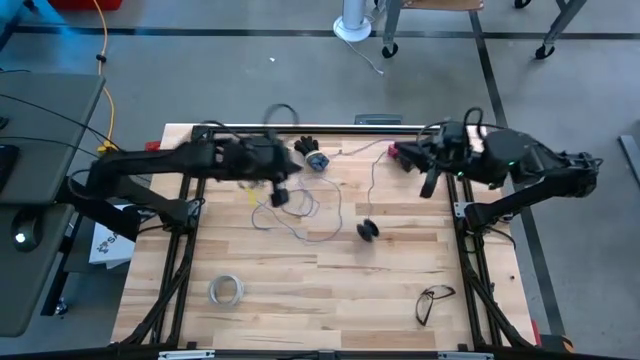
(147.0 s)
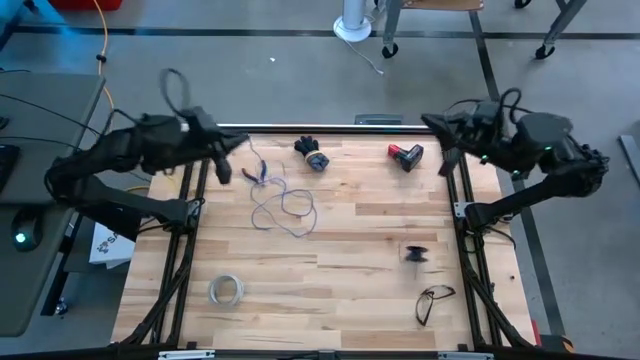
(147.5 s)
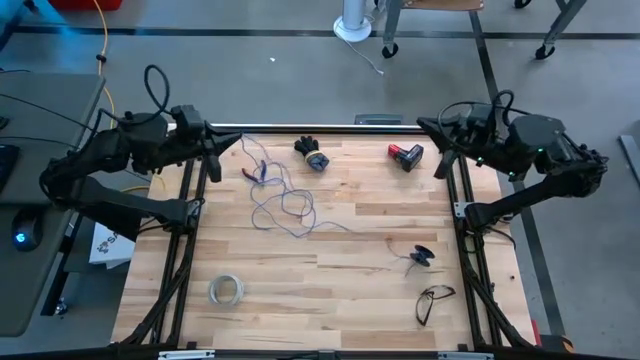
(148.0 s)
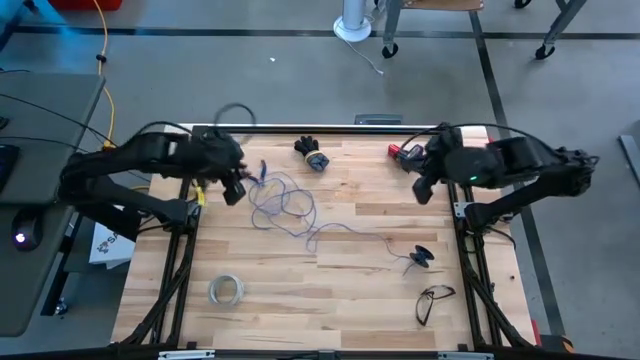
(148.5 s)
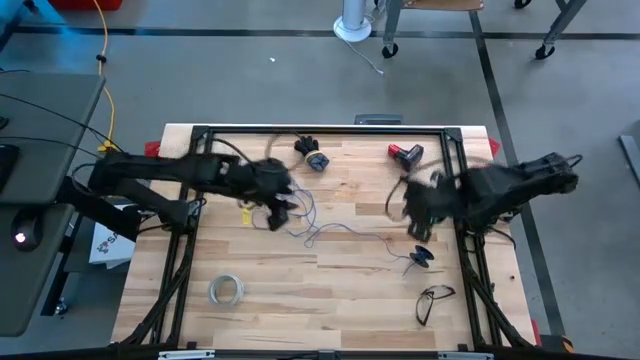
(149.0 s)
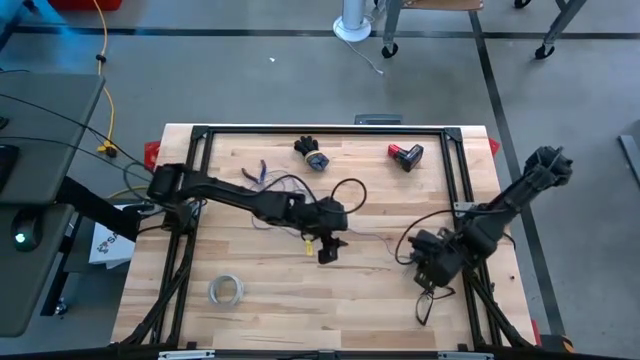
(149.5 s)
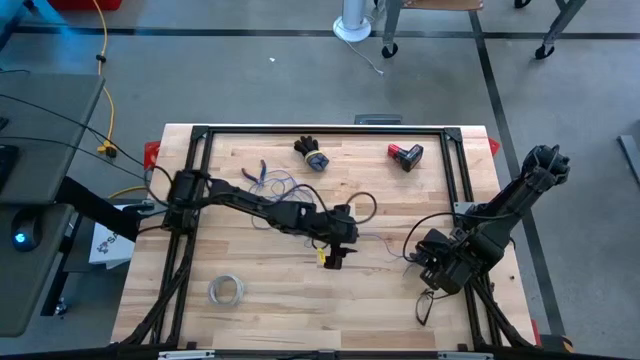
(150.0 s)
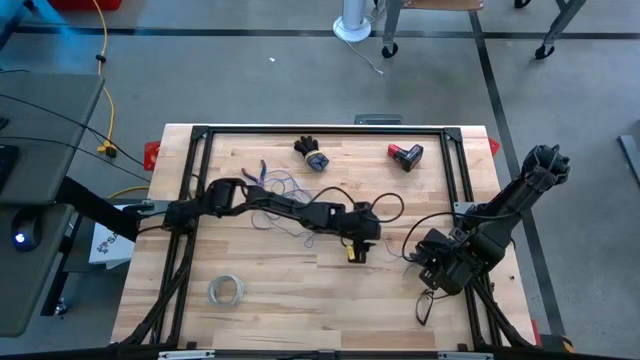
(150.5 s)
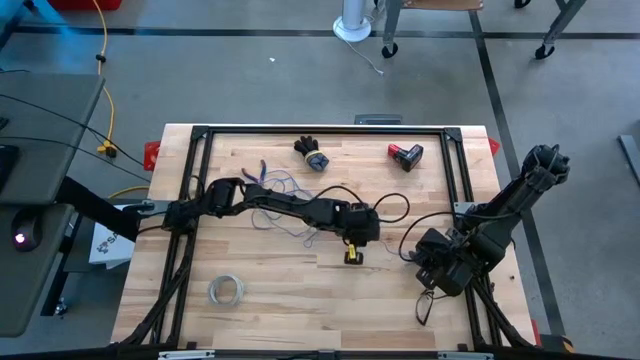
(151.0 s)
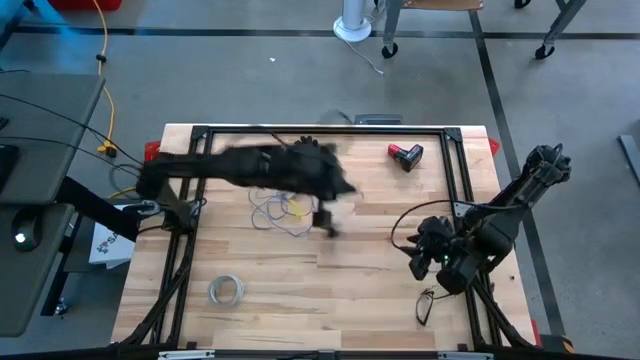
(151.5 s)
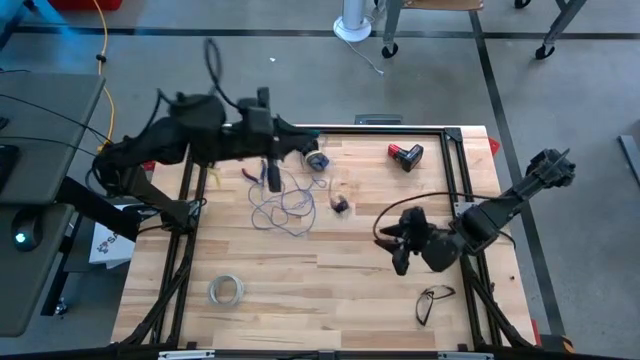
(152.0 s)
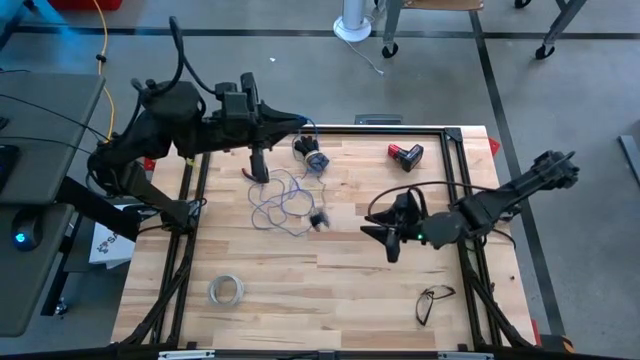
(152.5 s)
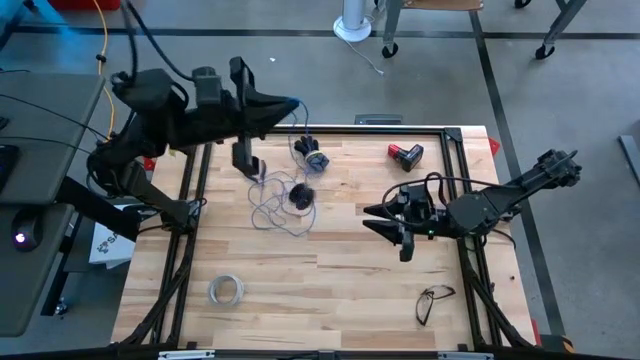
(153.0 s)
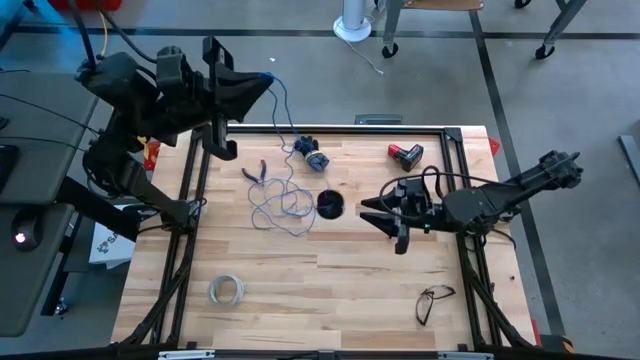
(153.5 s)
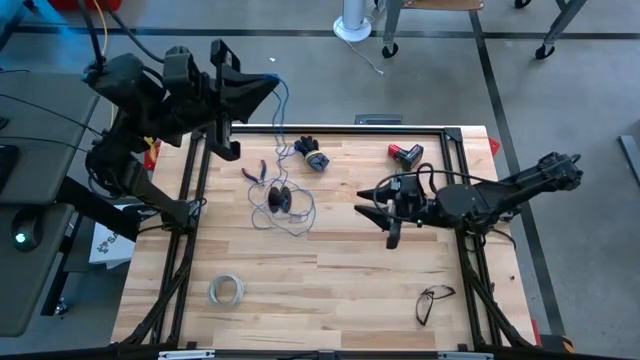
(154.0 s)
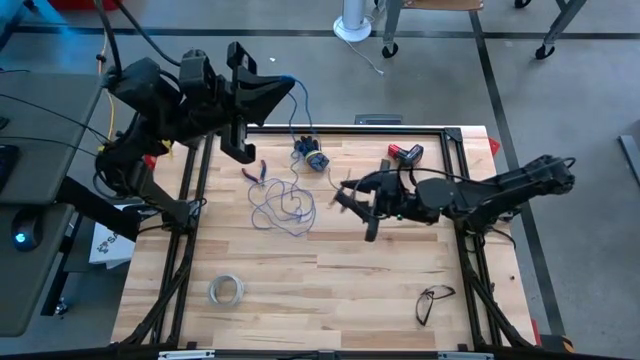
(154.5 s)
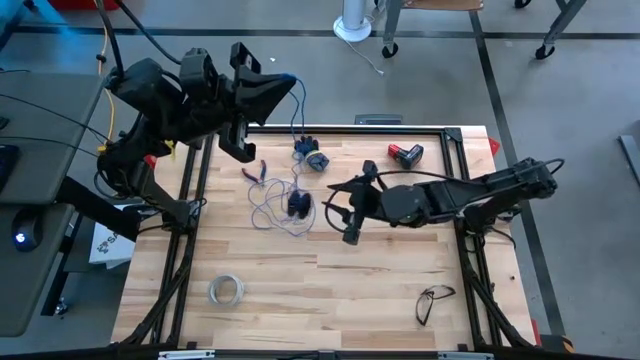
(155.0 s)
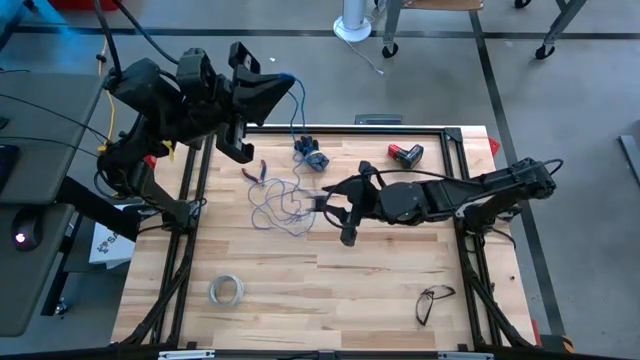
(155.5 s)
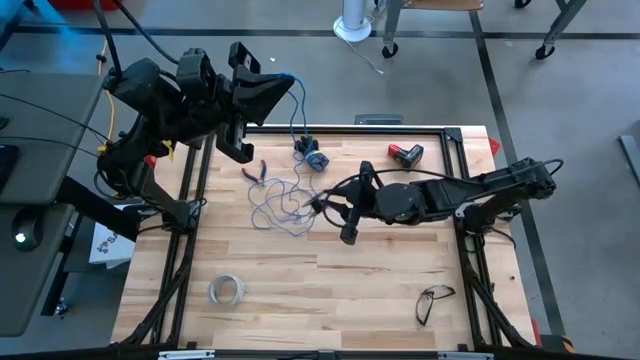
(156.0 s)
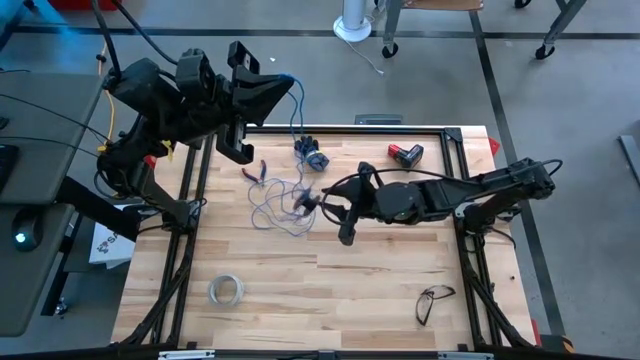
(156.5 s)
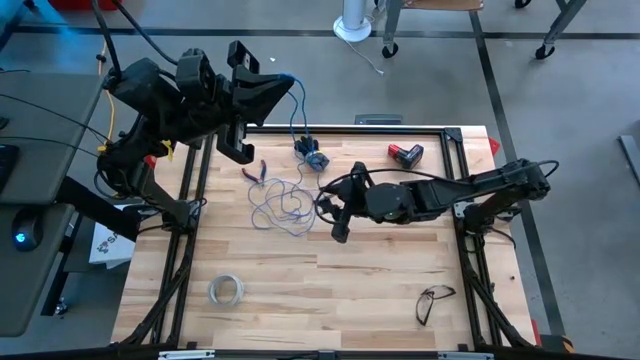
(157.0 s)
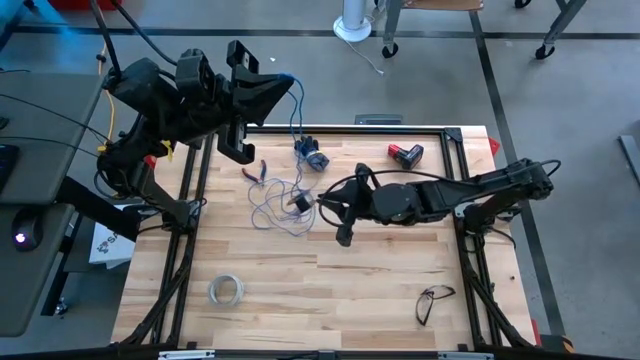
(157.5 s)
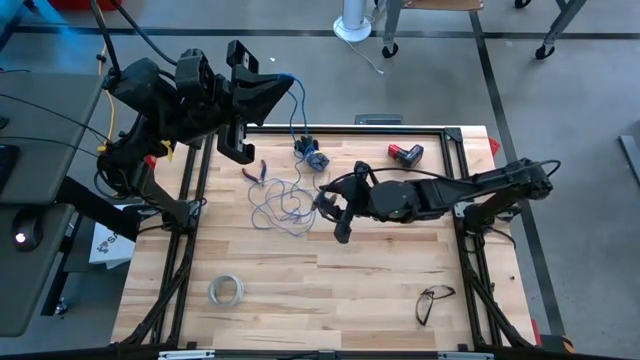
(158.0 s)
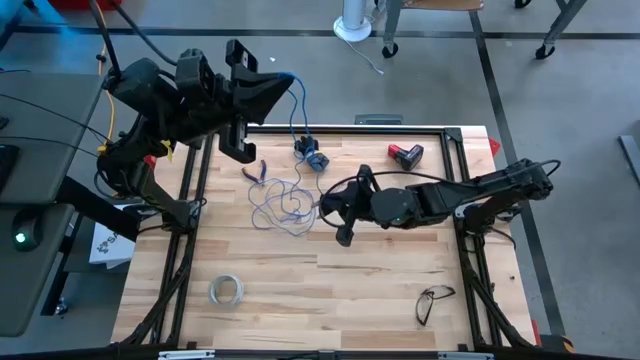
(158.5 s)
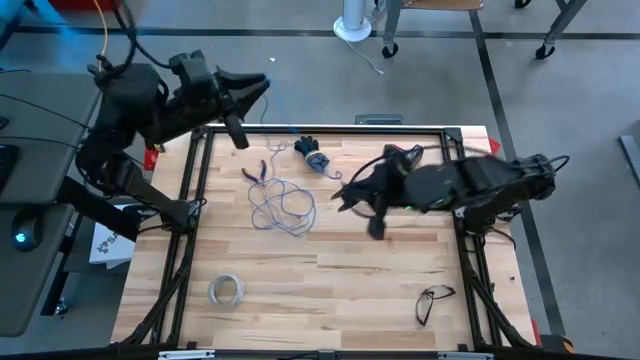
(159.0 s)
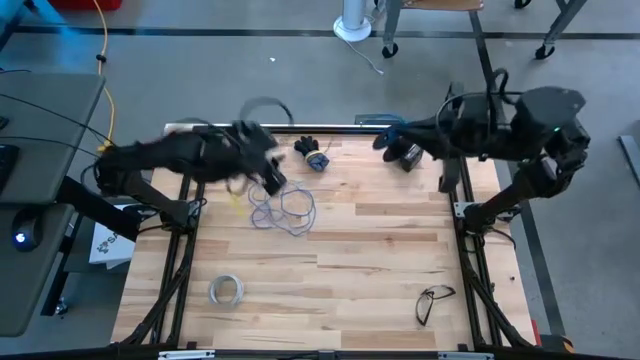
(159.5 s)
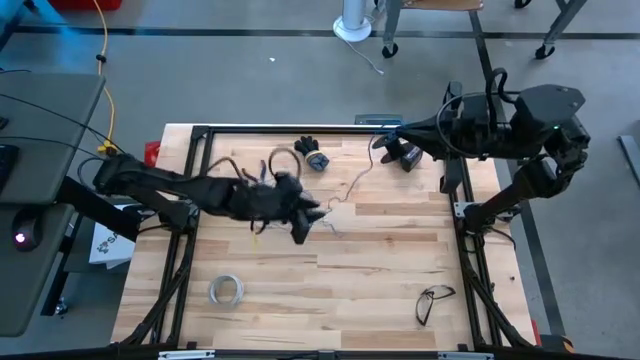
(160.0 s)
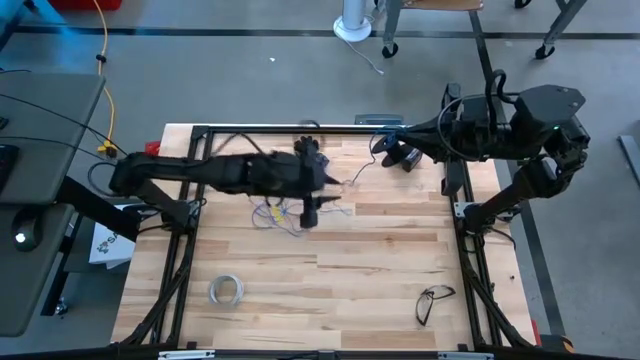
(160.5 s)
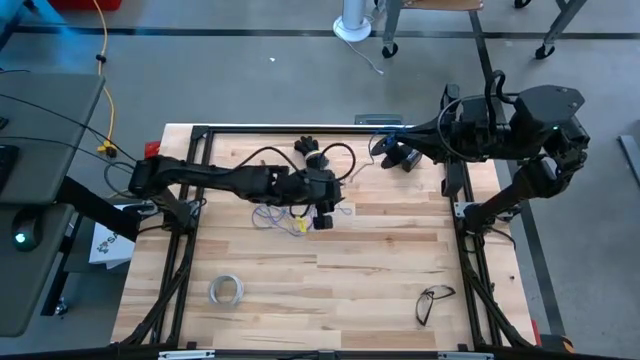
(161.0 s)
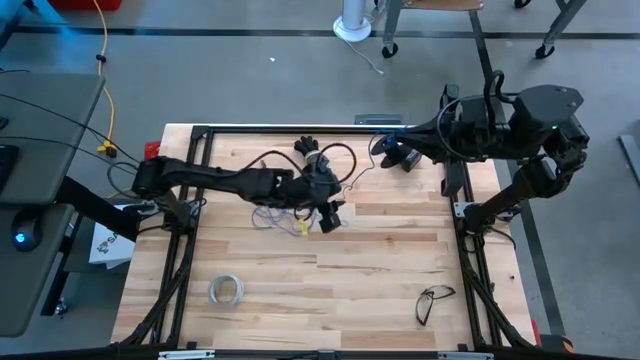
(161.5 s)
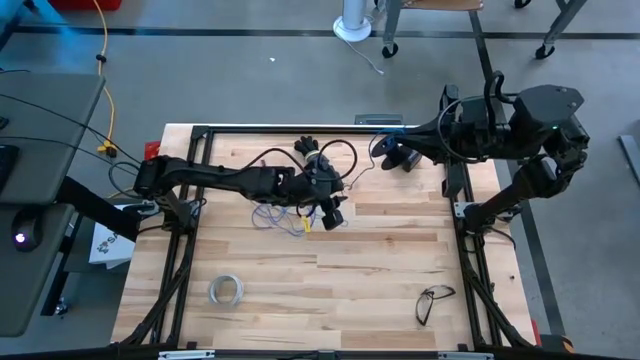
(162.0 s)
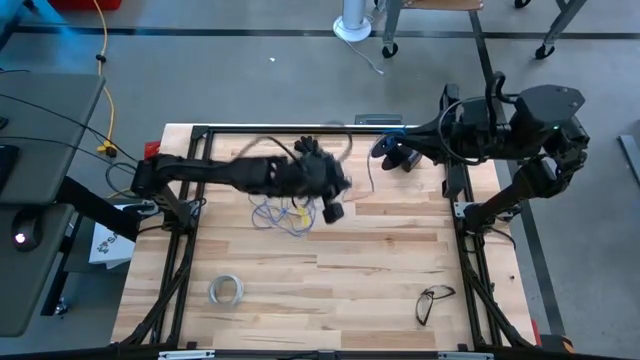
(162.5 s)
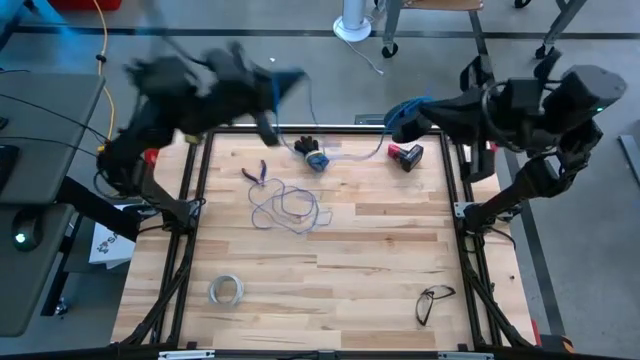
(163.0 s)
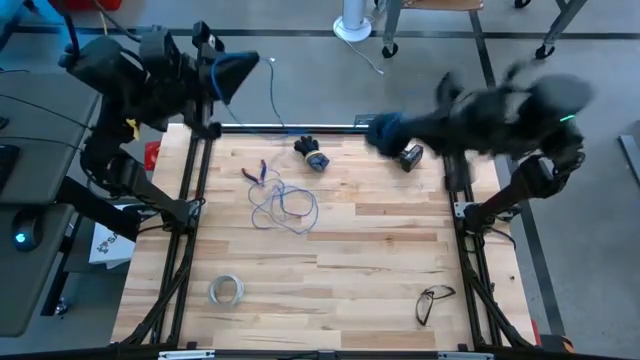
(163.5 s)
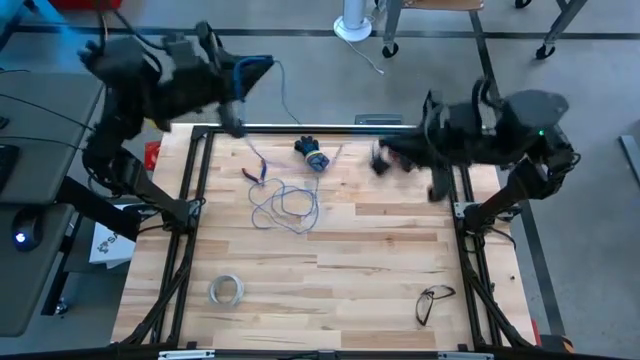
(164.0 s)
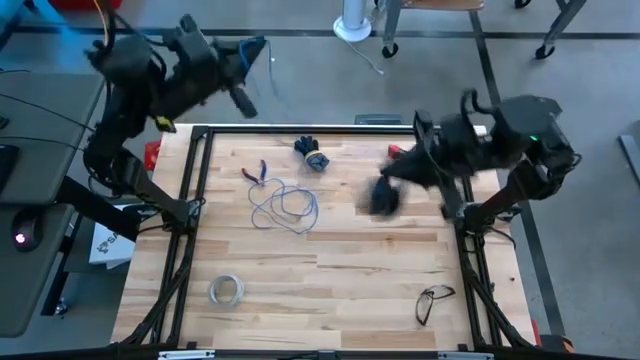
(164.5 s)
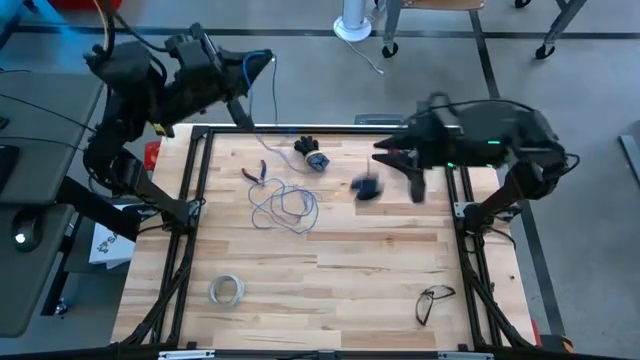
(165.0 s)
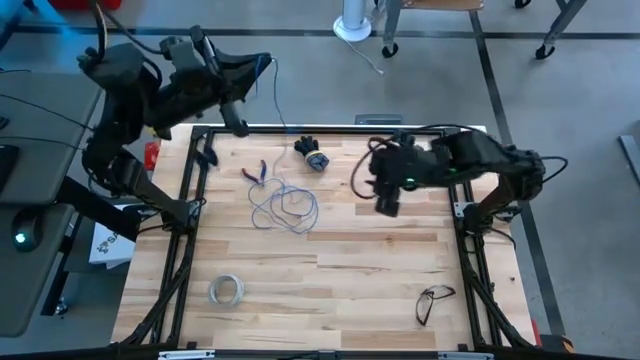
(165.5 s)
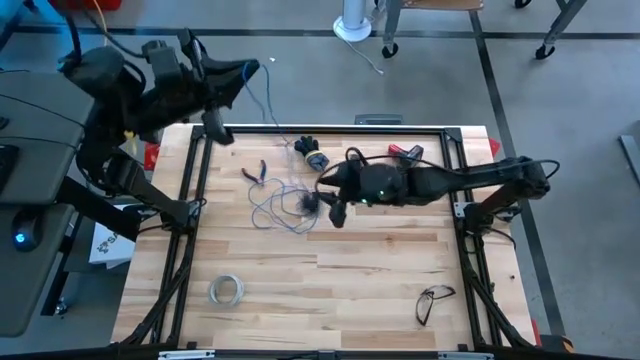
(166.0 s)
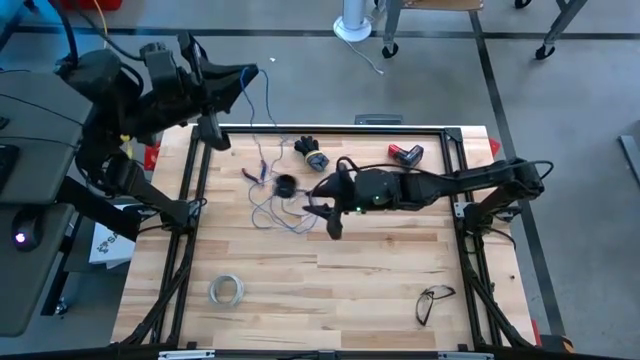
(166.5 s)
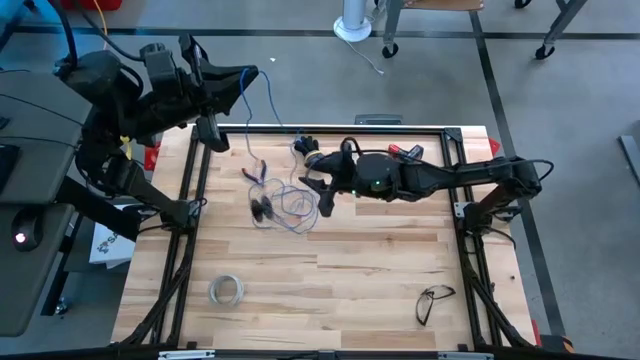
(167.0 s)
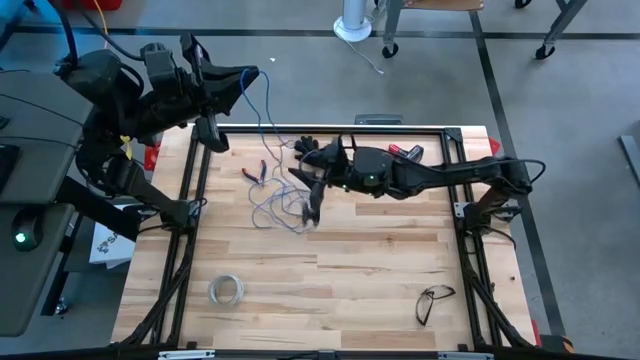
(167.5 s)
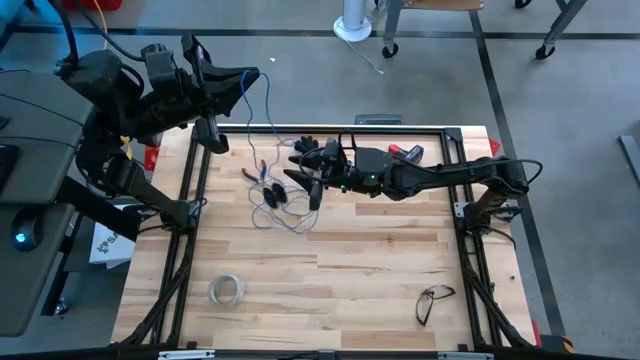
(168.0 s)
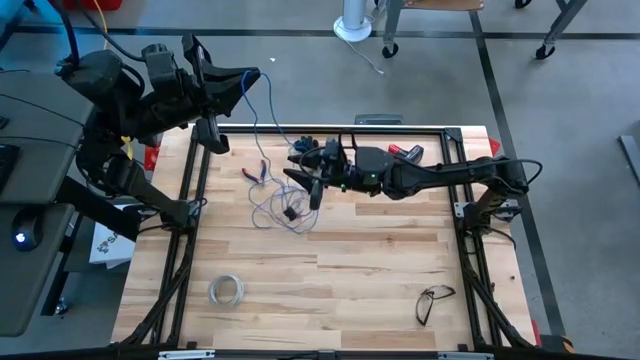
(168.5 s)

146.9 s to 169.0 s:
Task: Coil cords
Uncoil the blue wire from the black spool

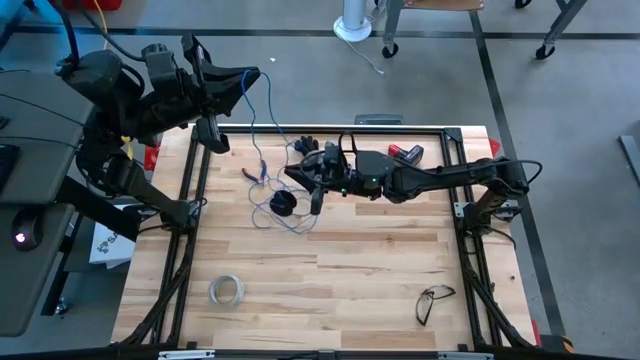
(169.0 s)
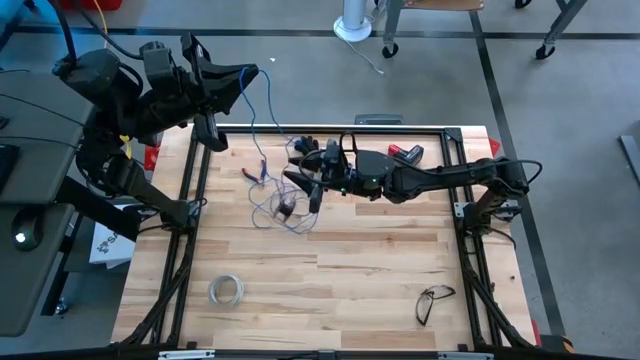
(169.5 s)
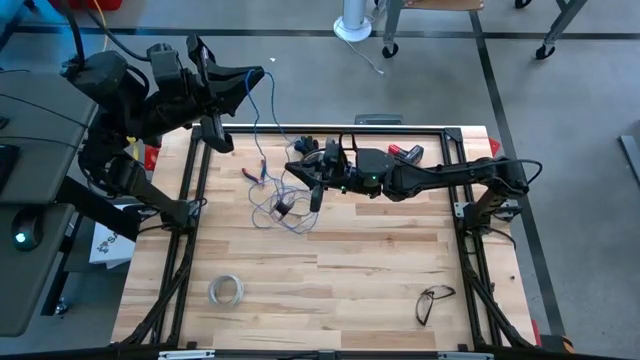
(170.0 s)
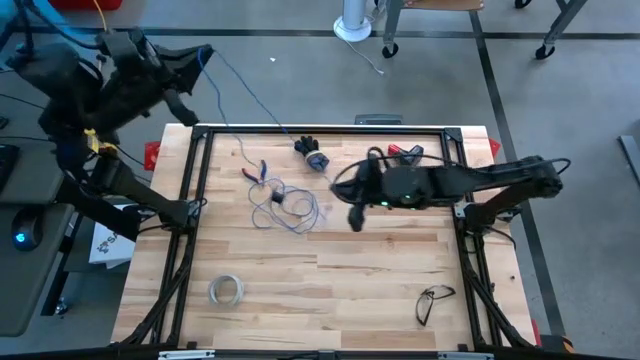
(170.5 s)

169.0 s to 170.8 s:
Uncoil the blue wire from the black spool
